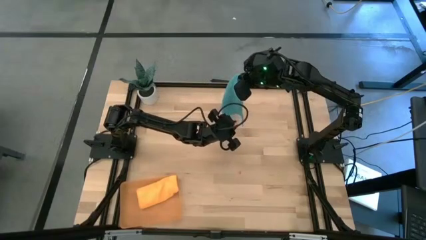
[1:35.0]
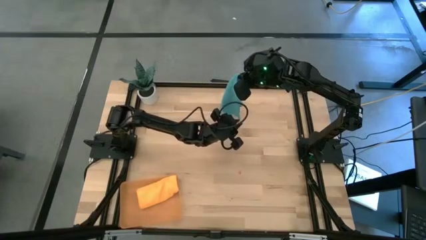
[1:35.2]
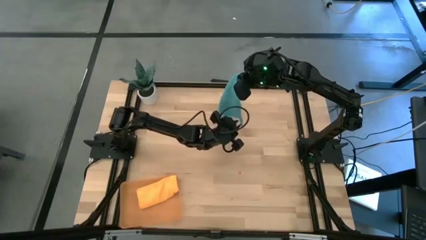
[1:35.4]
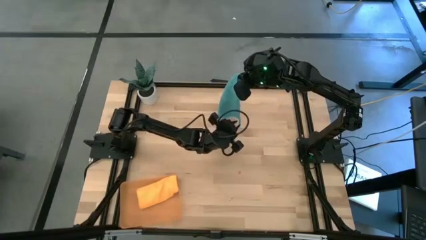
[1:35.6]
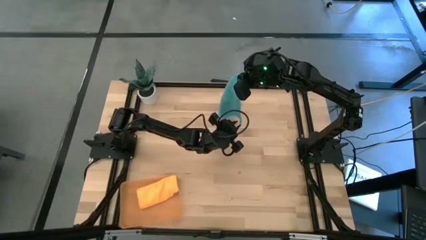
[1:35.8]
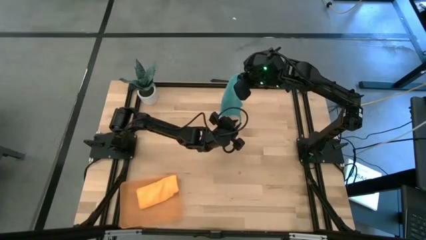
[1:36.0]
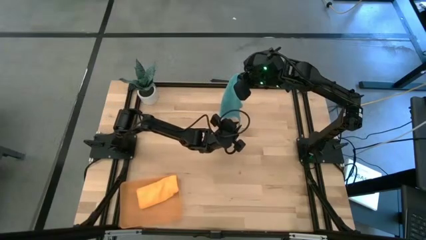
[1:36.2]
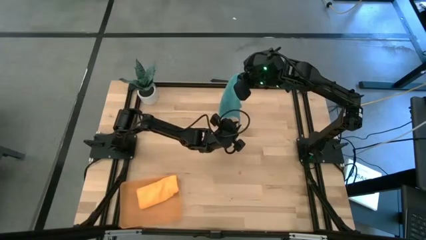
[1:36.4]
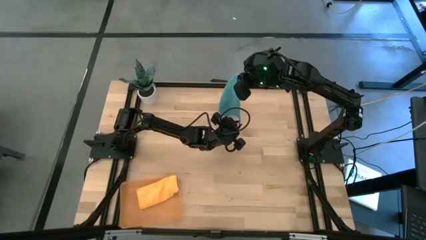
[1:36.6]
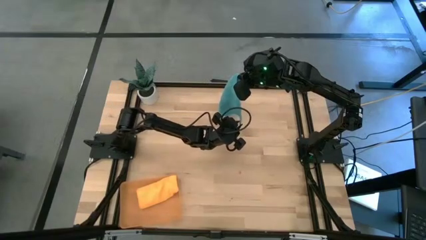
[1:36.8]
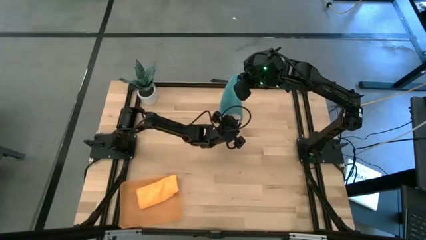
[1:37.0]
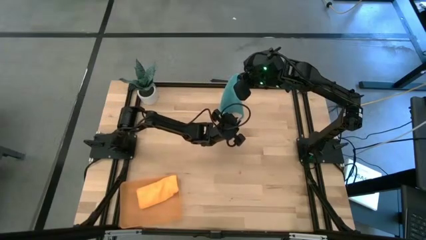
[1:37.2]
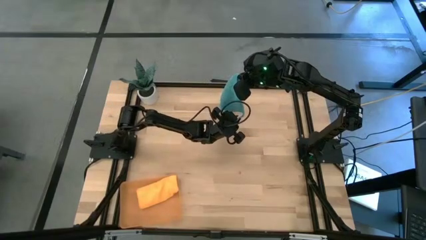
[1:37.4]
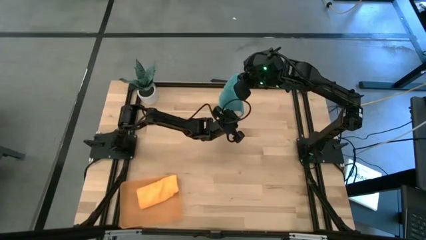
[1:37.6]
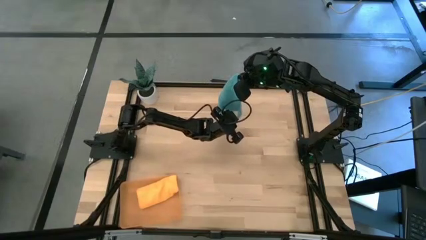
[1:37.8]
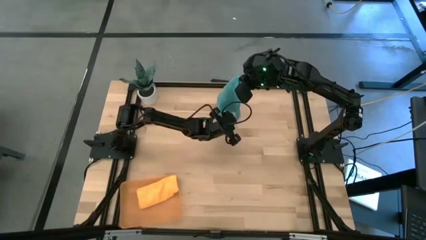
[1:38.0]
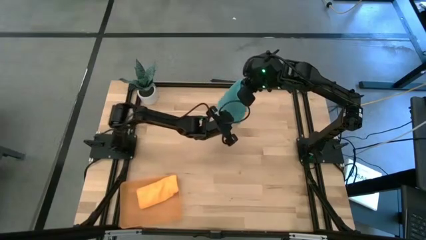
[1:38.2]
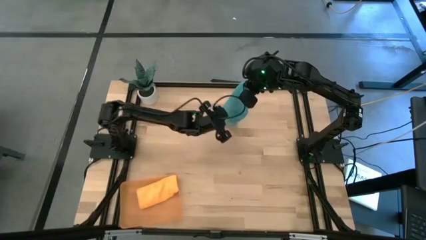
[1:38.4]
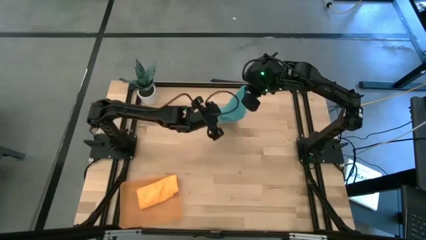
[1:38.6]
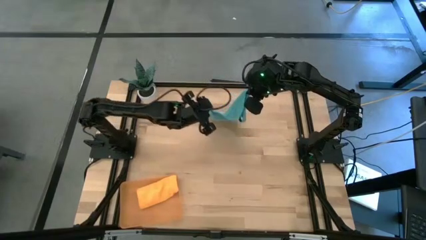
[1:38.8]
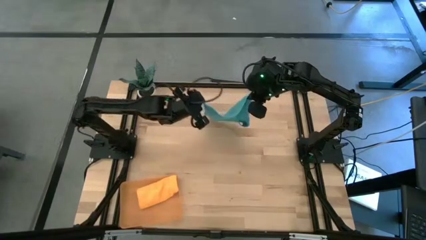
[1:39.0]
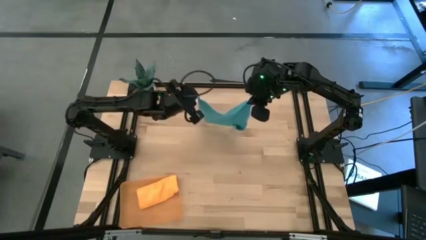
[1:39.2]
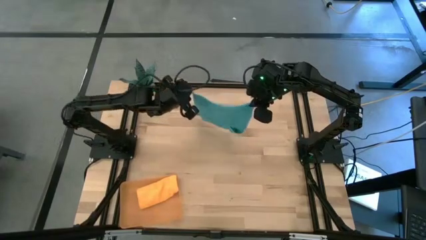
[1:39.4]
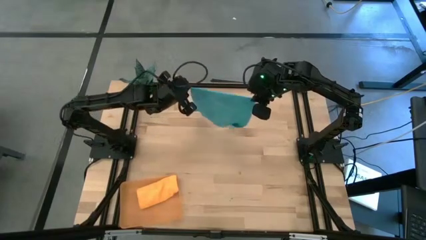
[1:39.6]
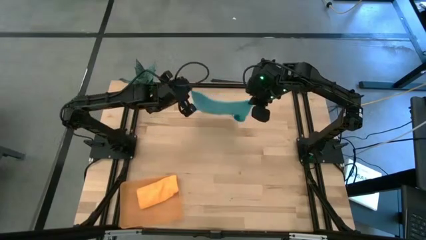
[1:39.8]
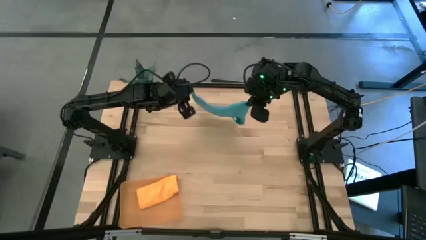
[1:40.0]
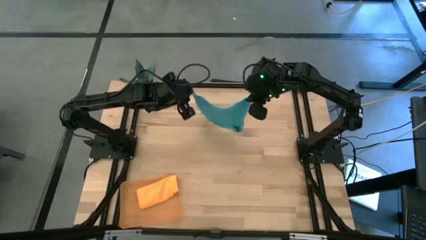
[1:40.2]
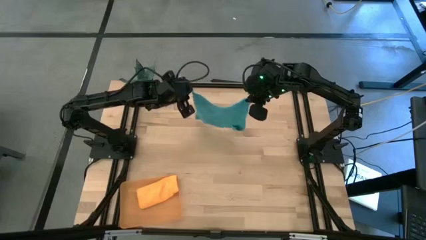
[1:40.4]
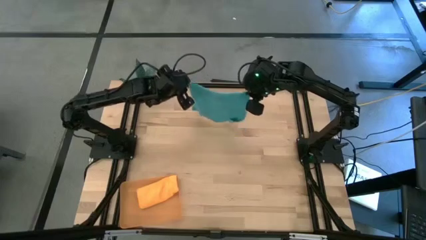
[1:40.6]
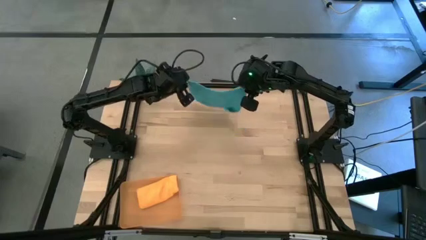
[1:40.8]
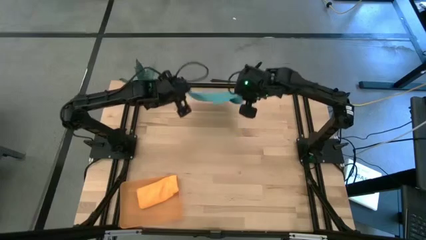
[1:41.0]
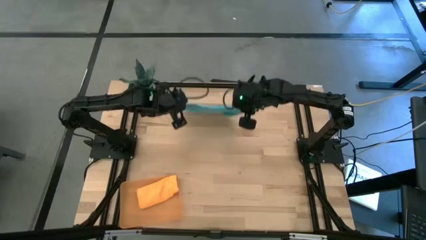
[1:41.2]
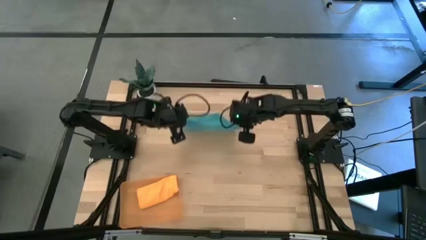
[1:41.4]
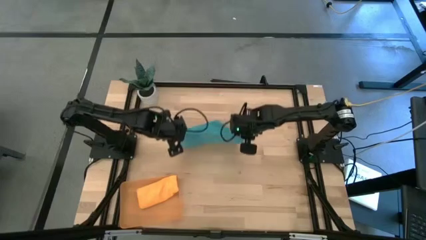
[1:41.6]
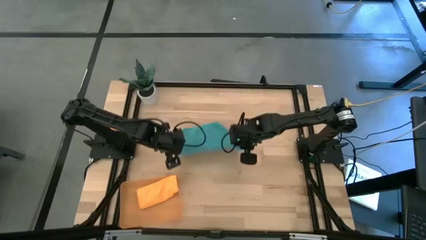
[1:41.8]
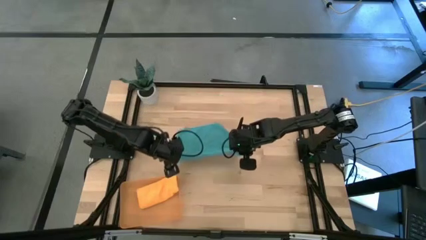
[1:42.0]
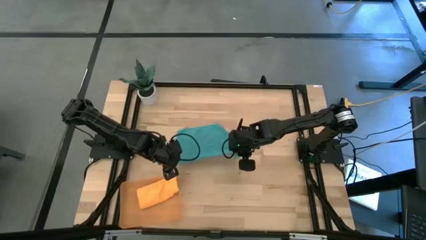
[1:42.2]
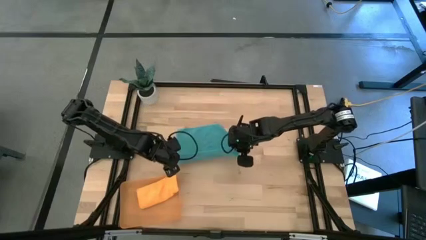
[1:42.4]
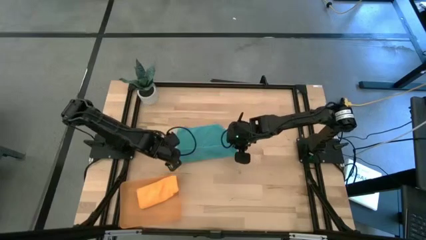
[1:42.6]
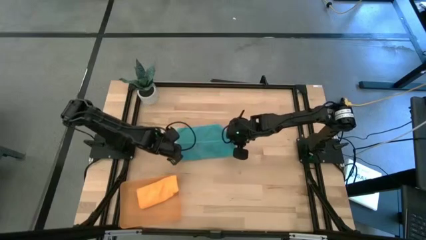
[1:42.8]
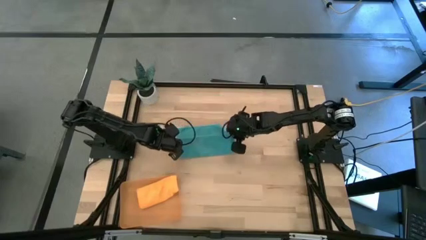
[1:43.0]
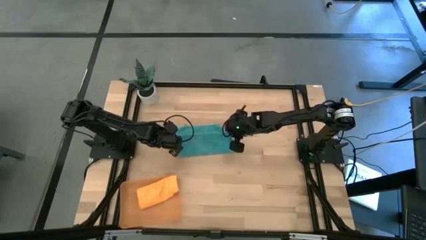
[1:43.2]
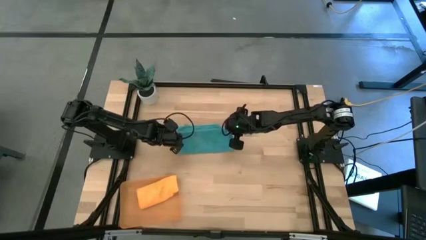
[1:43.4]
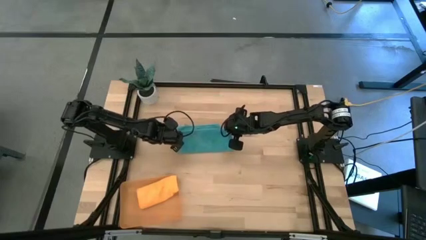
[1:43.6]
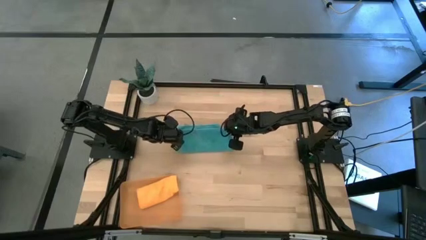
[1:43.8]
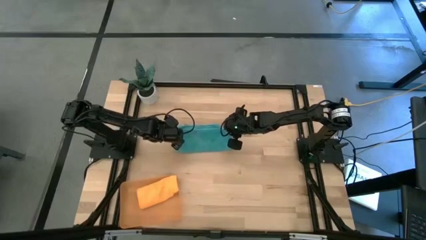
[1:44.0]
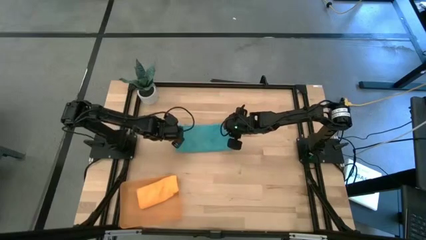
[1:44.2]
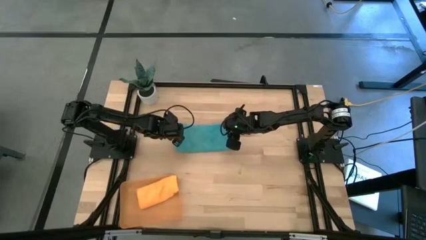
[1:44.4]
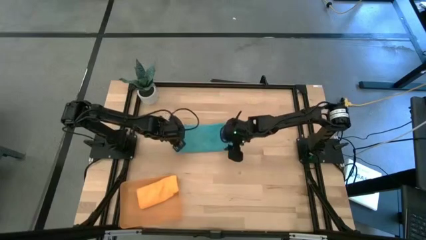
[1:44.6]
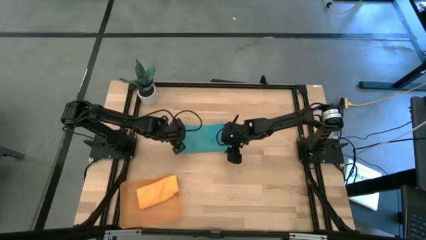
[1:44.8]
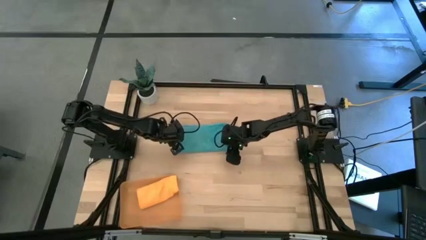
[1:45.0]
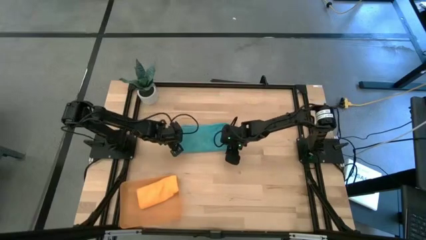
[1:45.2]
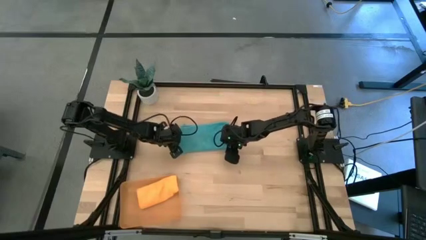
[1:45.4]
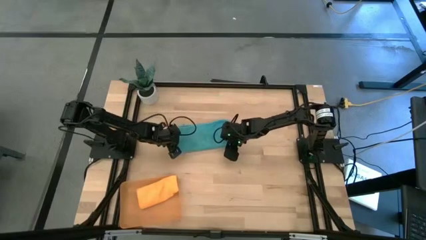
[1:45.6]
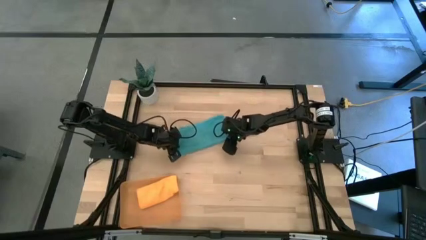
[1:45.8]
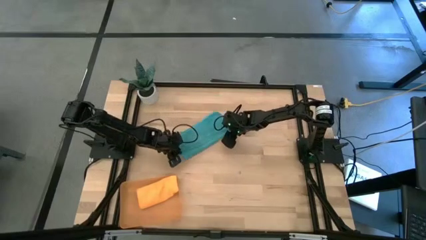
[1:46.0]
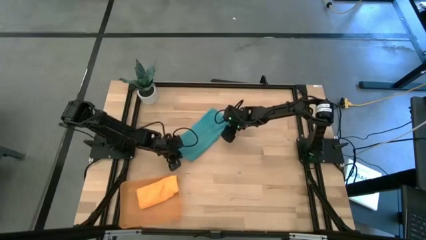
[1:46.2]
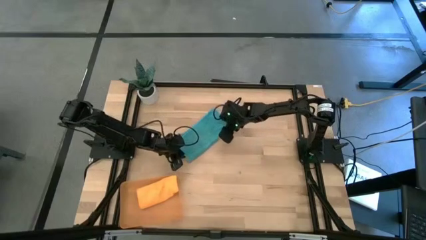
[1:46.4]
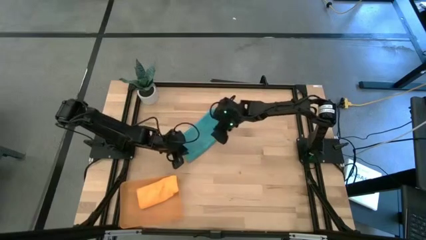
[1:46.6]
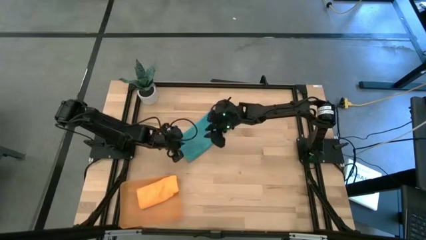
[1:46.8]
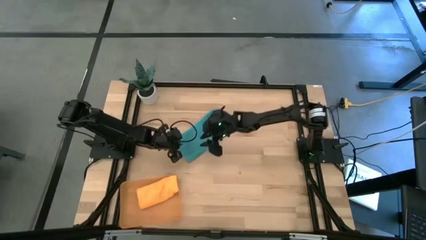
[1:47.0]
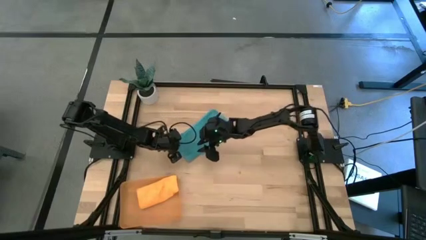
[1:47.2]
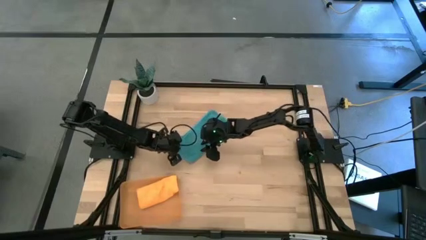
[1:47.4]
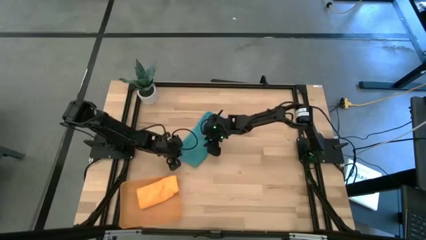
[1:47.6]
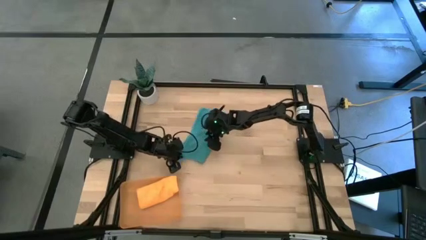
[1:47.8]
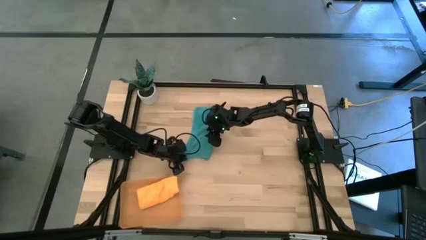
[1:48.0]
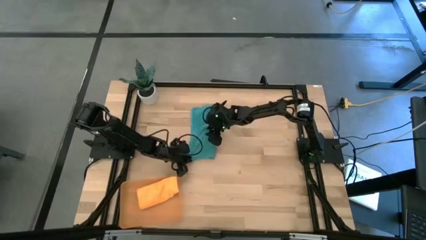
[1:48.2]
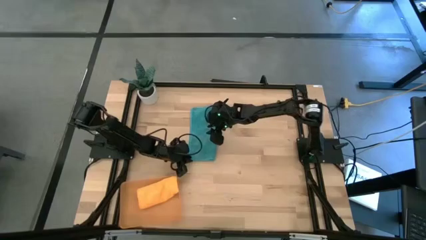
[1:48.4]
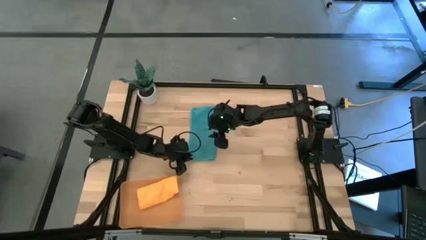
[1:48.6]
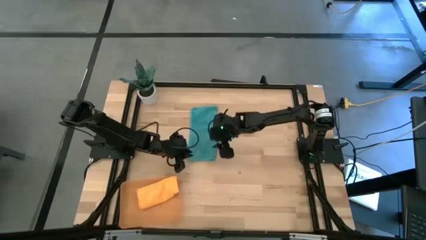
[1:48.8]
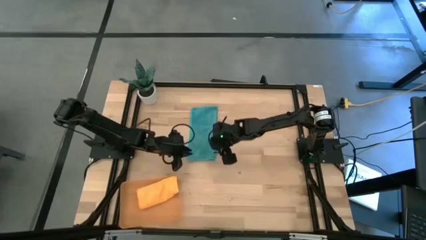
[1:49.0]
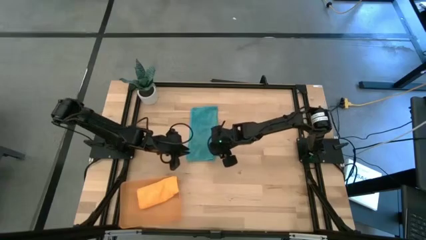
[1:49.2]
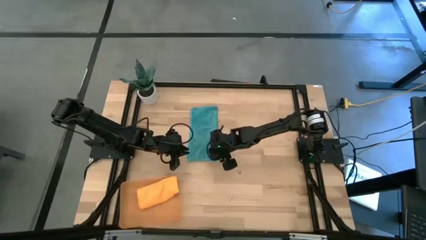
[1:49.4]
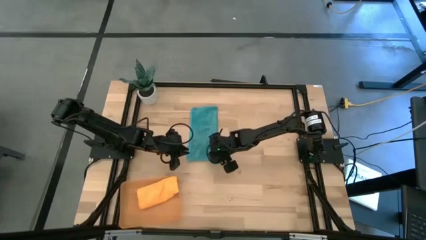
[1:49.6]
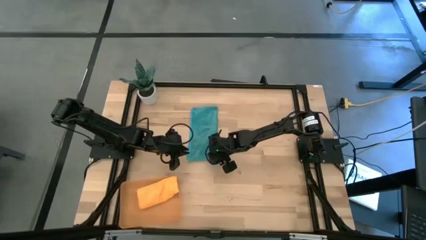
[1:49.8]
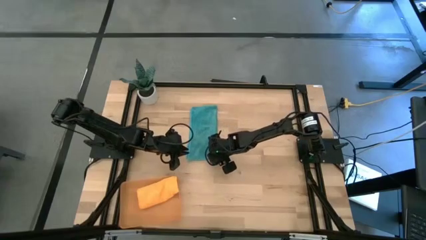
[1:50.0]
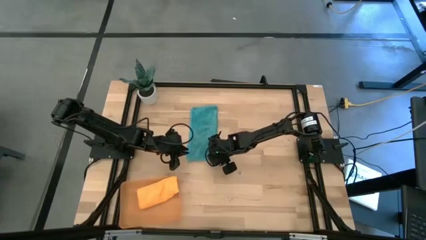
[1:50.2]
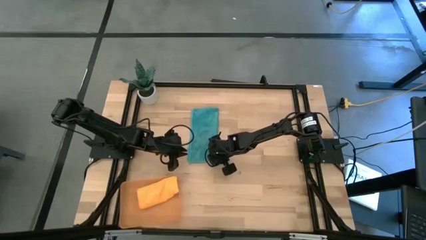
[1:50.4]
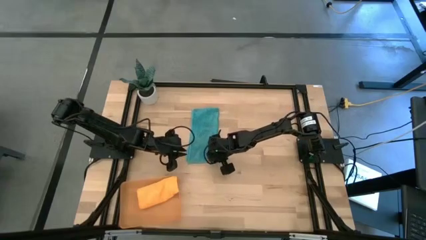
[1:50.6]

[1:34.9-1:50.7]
Task: Roll microfiber towels into tight, uniform cylinder then place into a basket
Roll the blue microfiber towel

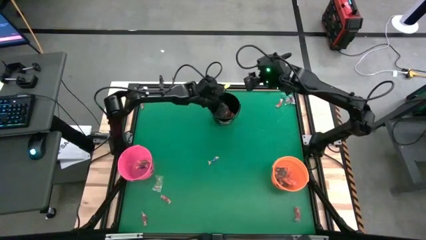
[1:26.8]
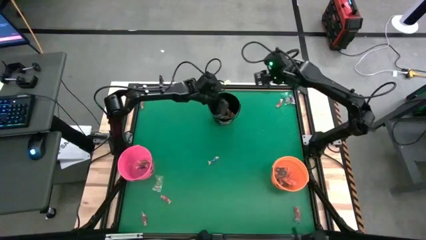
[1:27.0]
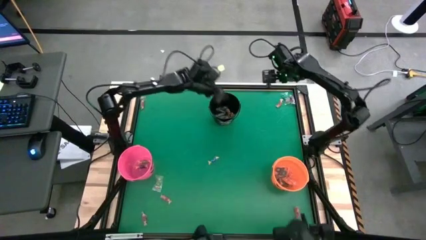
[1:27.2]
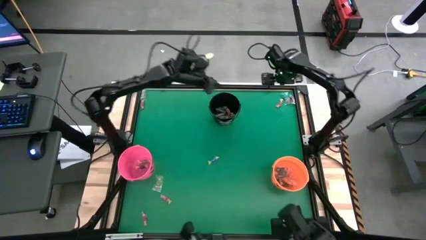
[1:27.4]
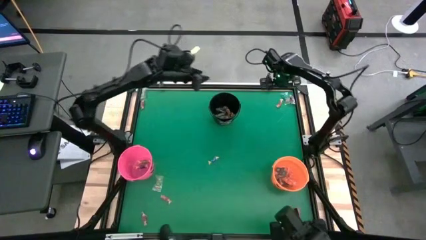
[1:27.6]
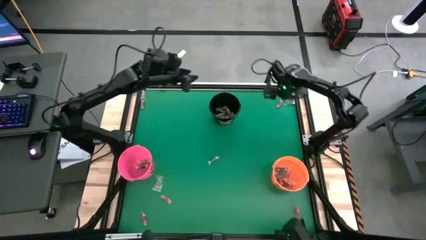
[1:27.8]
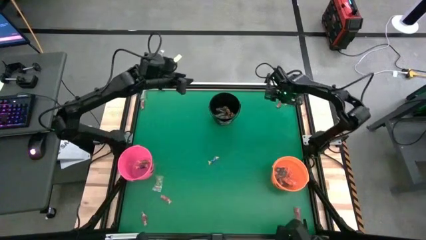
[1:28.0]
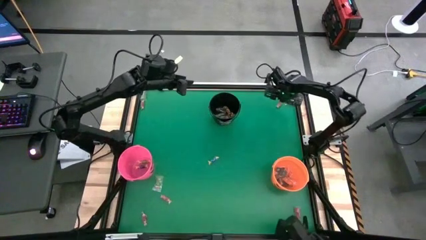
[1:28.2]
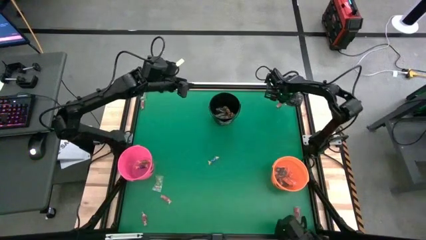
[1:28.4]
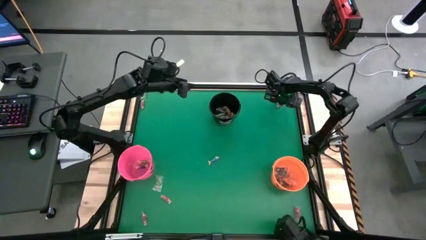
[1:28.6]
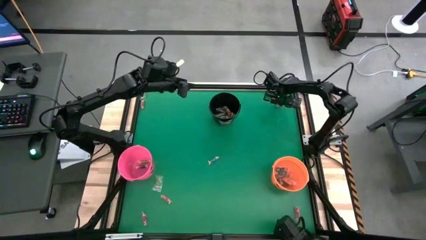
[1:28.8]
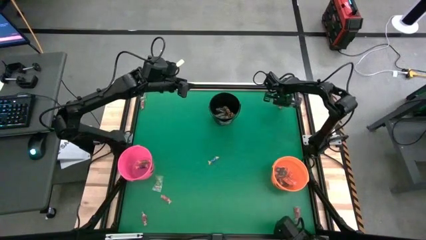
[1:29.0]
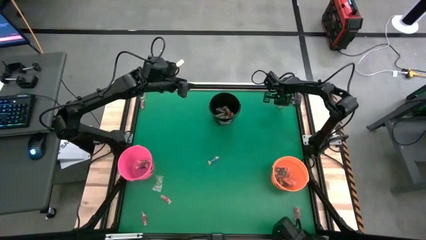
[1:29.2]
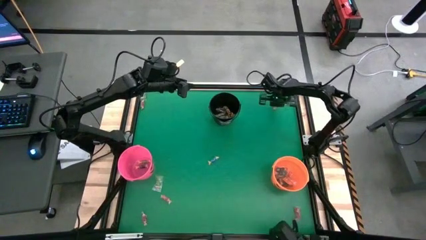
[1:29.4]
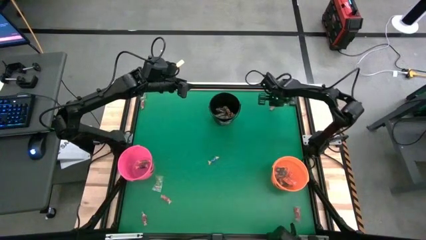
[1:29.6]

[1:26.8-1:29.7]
Task: Sort candy by brand, put in halloween buckets
Put the red candy into the black bucket
